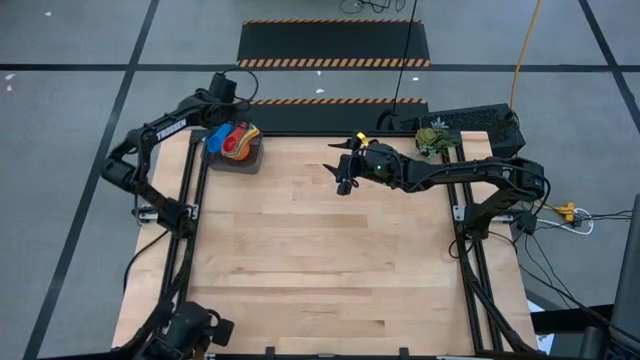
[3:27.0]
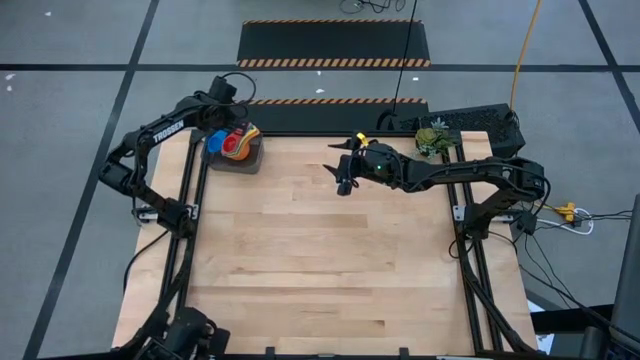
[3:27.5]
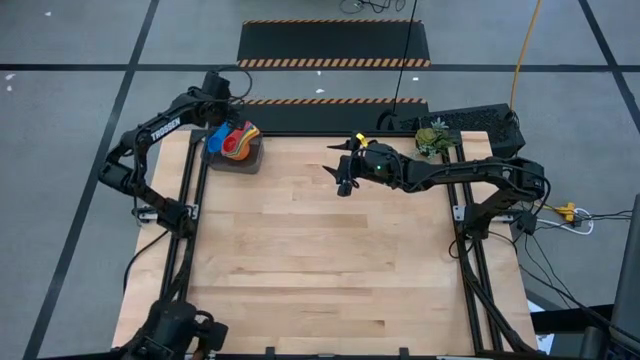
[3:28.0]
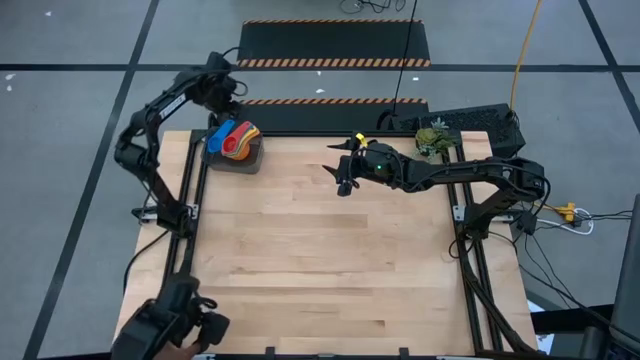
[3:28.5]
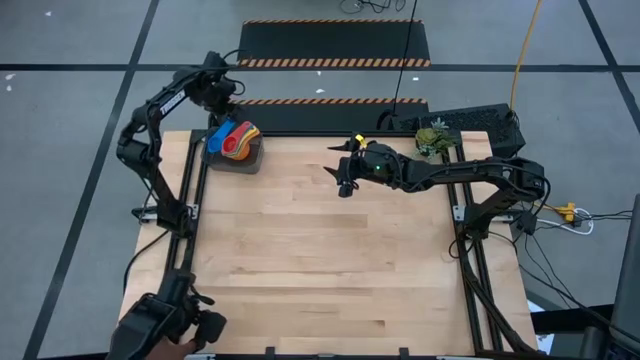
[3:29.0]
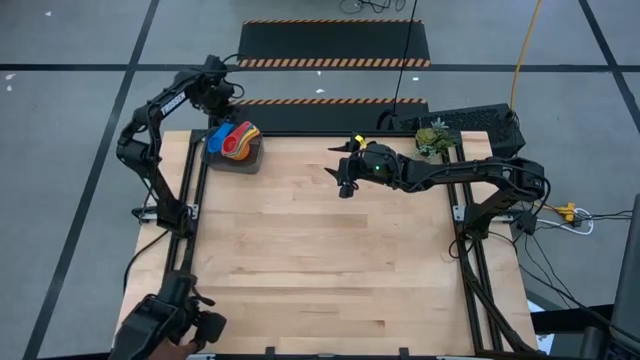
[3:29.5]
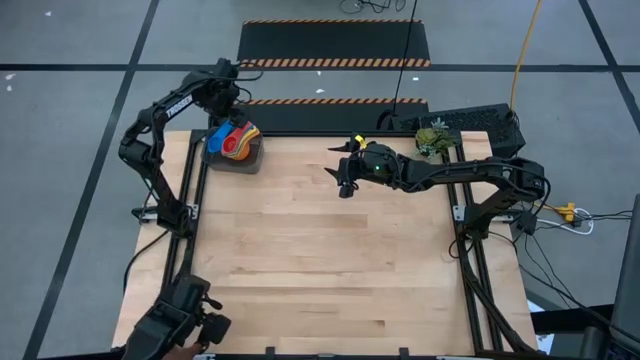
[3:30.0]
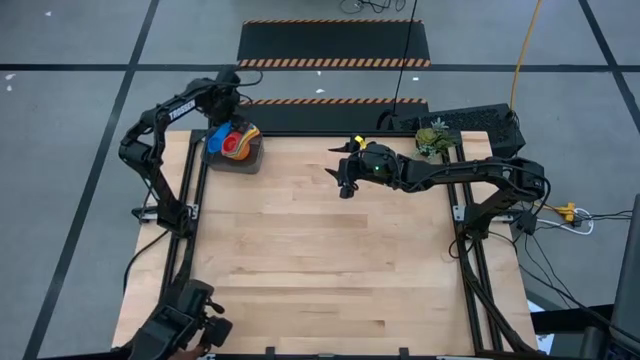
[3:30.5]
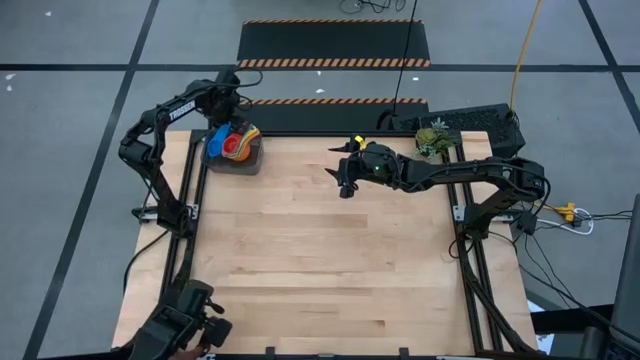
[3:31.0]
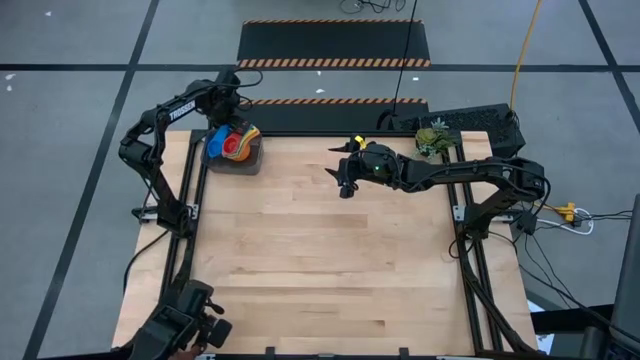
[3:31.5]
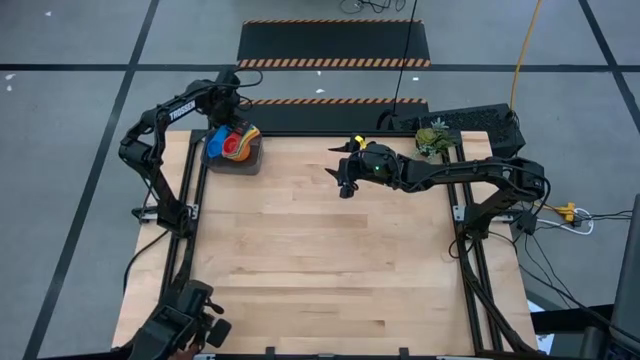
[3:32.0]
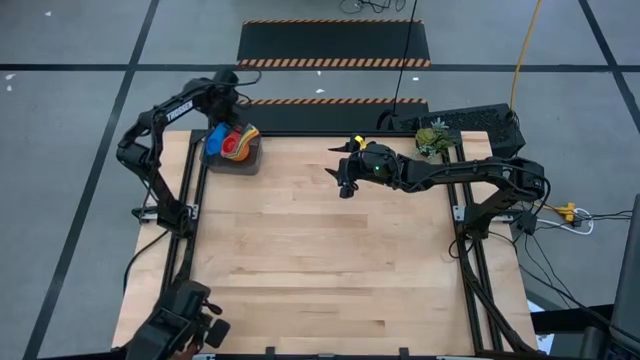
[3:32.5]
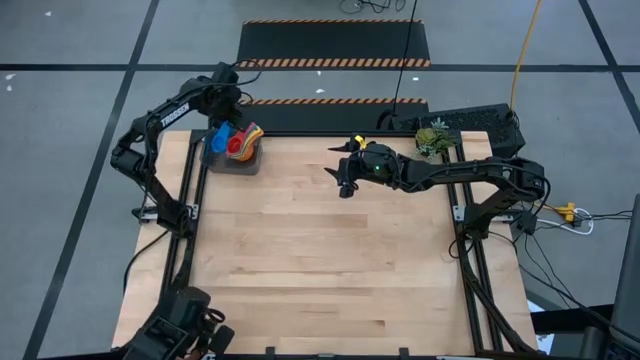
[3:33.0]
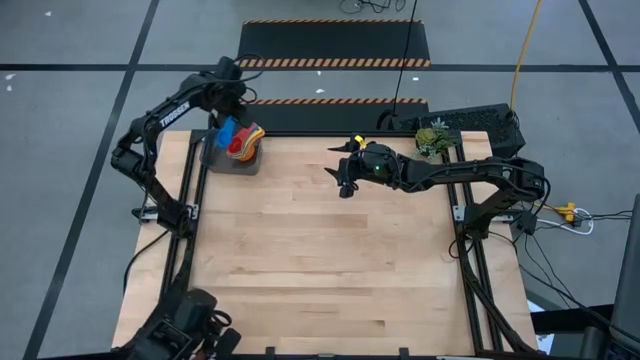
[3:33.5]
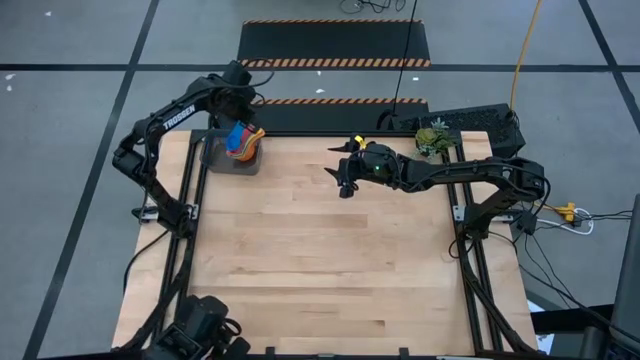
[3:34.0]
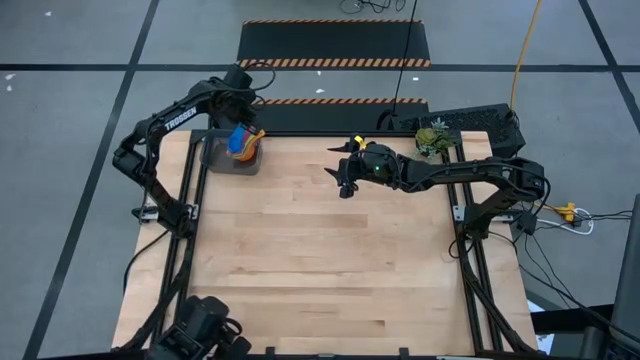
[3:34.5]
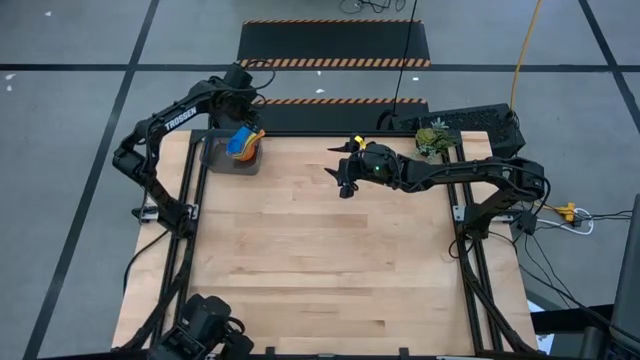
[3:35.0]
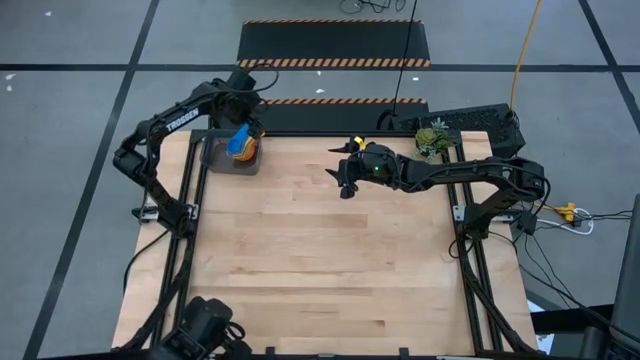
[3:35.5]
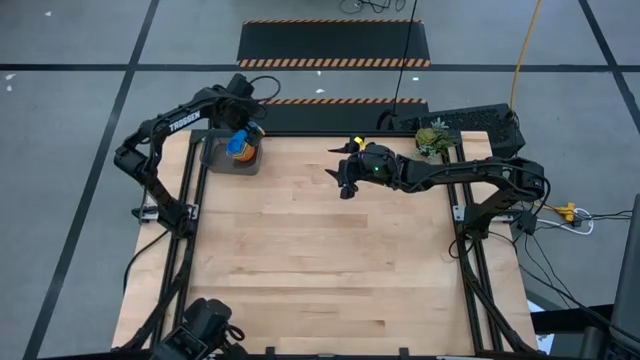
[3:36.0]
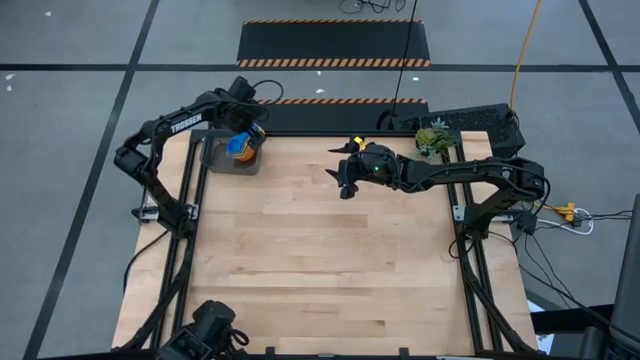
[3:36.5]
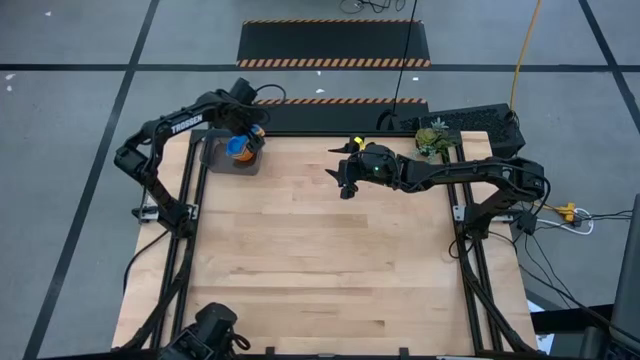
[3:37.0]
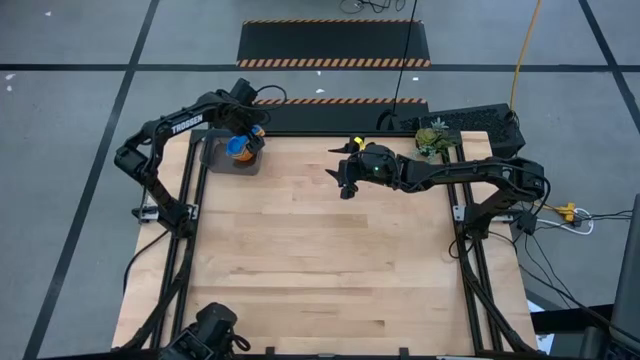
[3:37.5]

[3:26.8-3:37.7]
Task: Nest measuring cups in basket
Stack the blue measuring cup on top of the red measuring cup

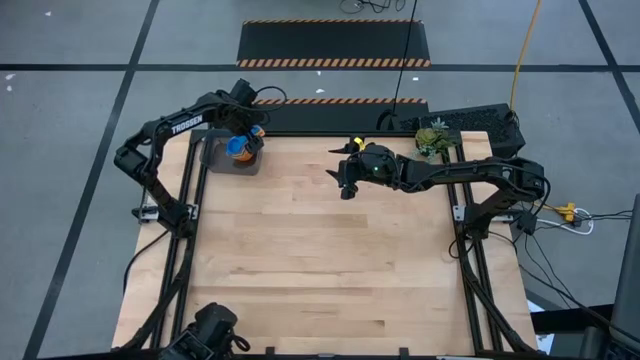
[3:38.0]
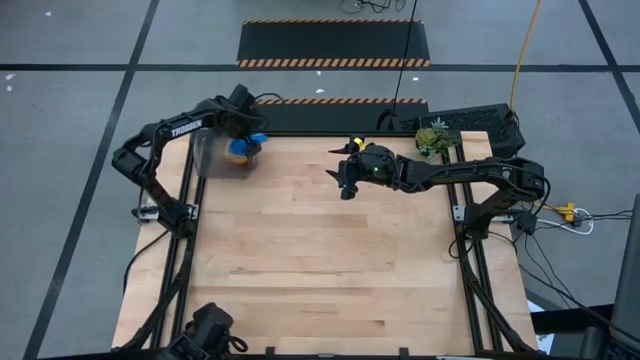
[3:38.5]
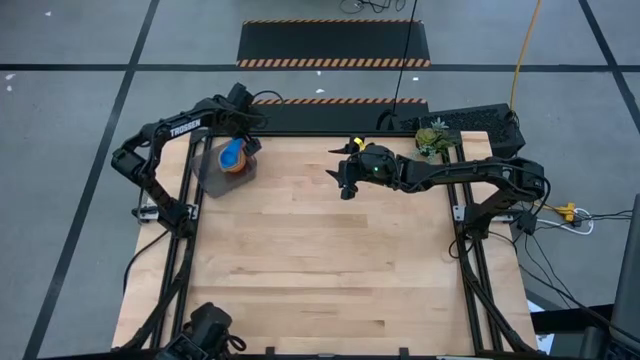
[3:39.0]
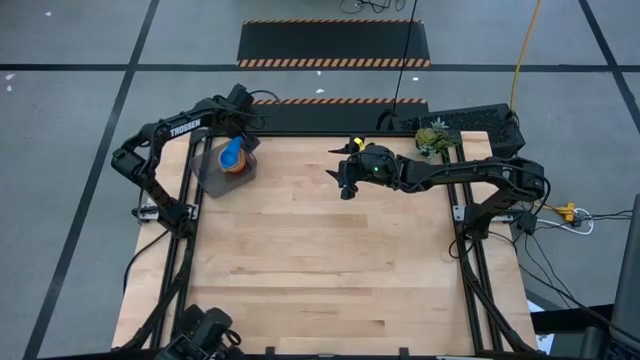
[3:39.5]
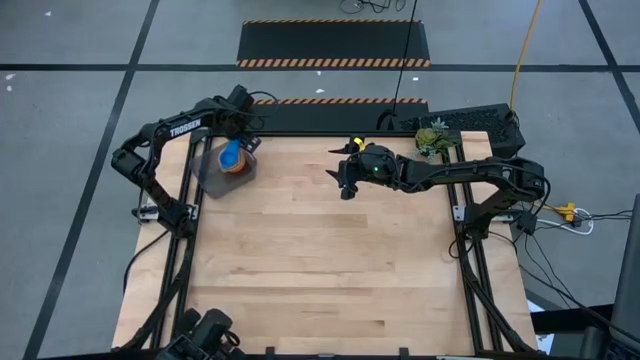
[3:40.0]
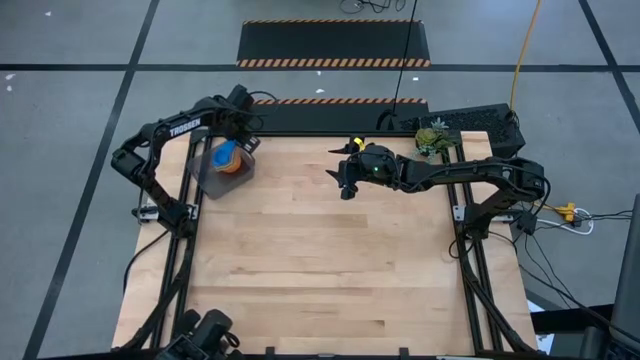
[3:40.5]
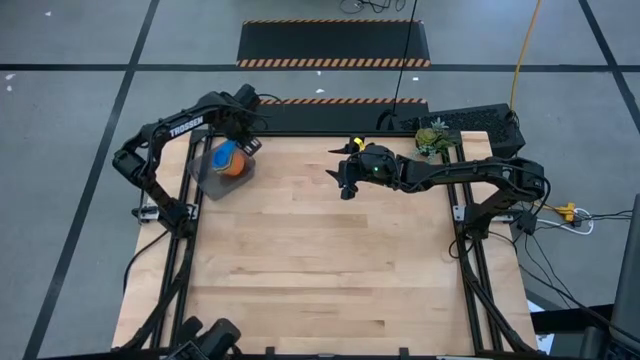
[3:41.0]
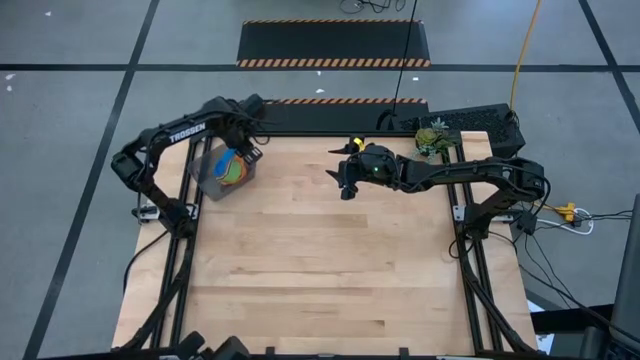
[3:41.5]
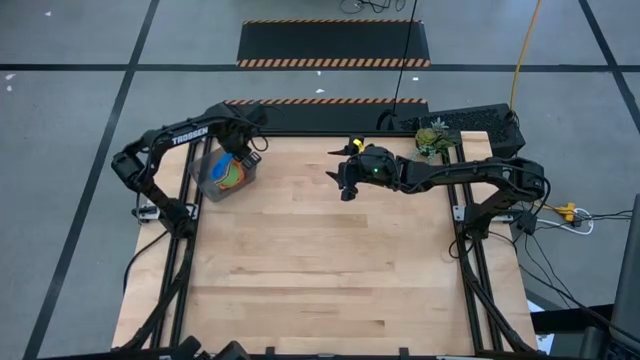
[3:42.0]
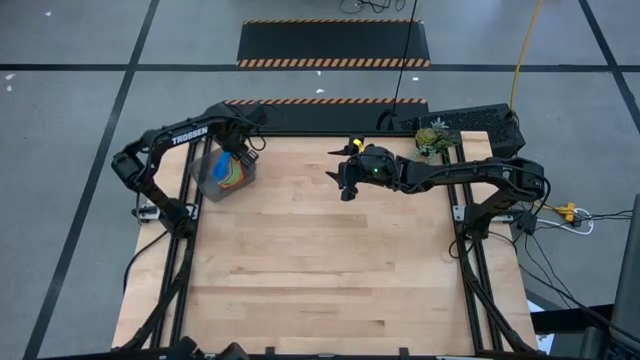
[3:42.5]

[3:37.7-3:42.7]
Adjust the stacked measuring cup into the black bin

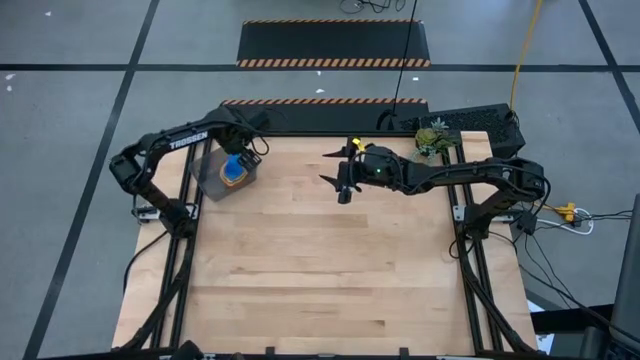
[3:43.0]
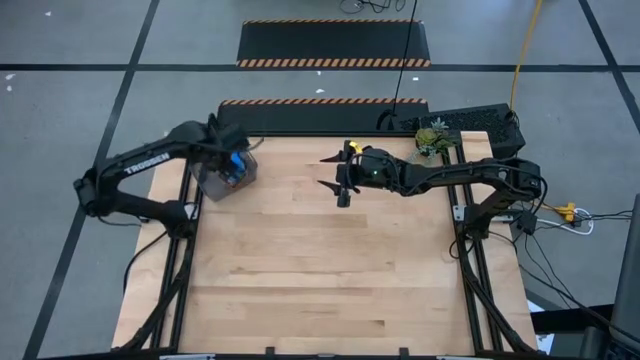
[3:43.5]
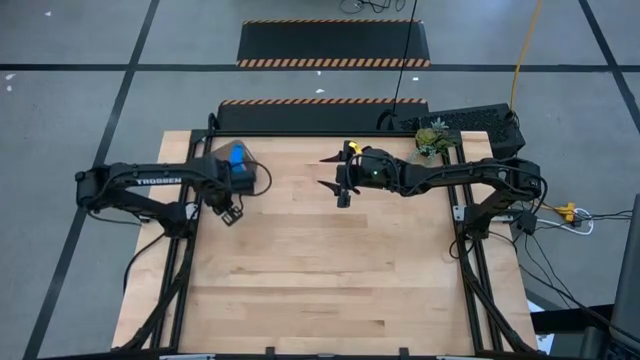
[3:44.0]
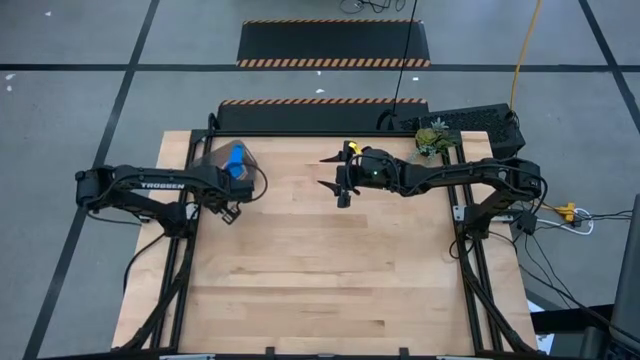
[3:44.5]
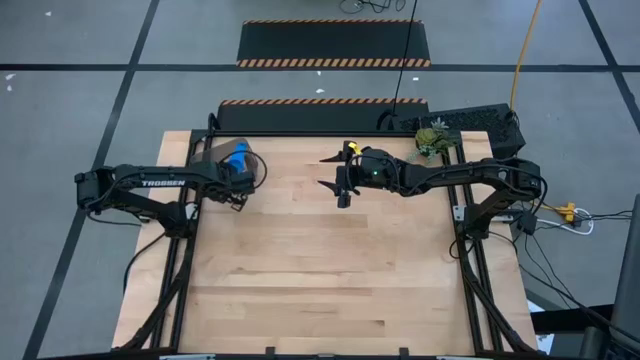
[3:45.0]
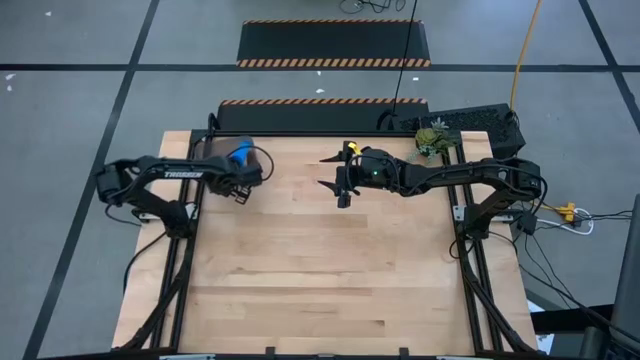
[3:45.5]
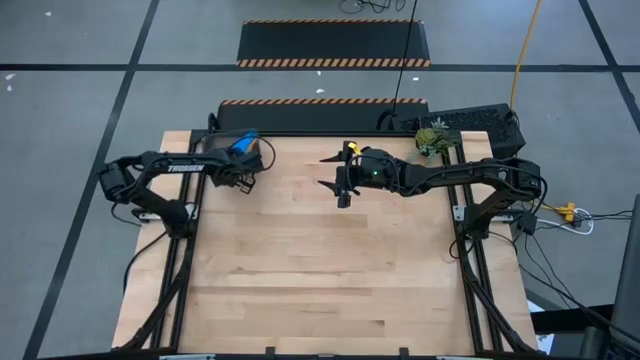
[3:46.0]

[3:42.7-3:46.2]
Adjust the black bin

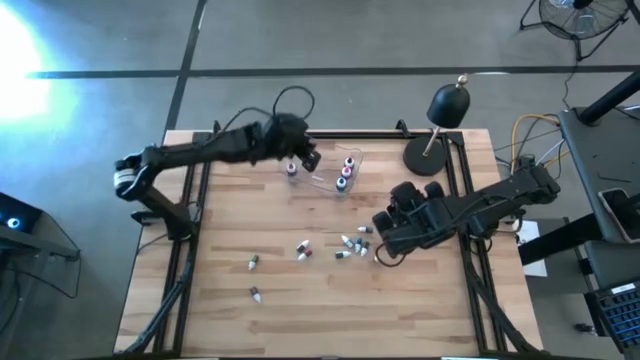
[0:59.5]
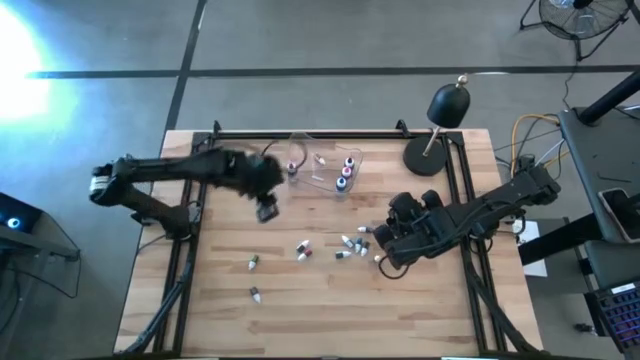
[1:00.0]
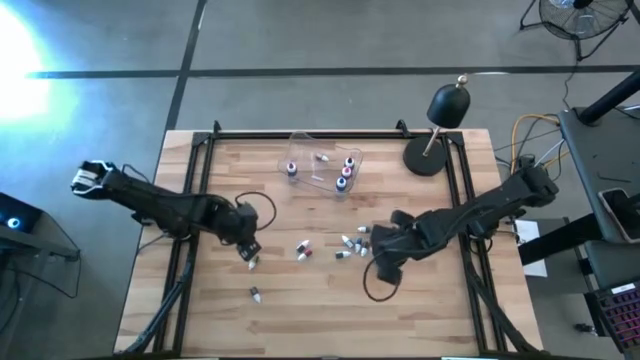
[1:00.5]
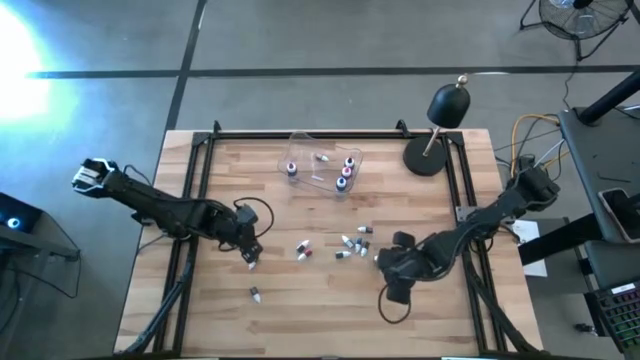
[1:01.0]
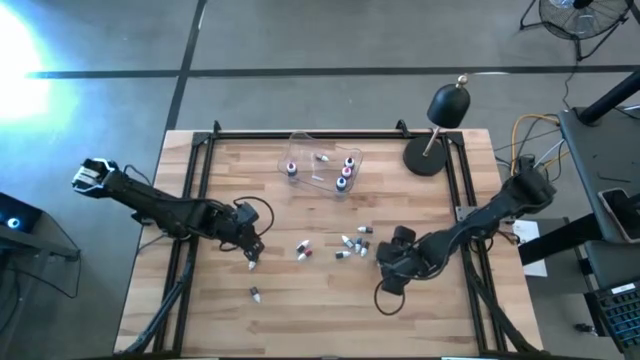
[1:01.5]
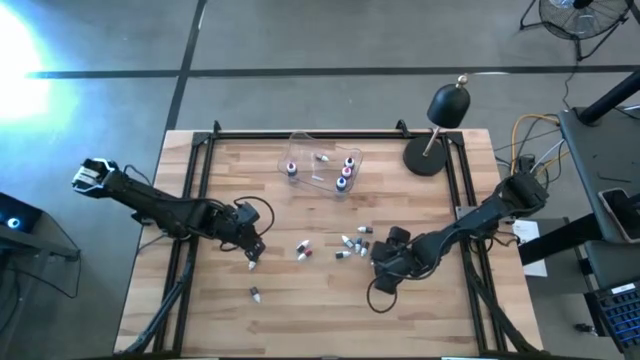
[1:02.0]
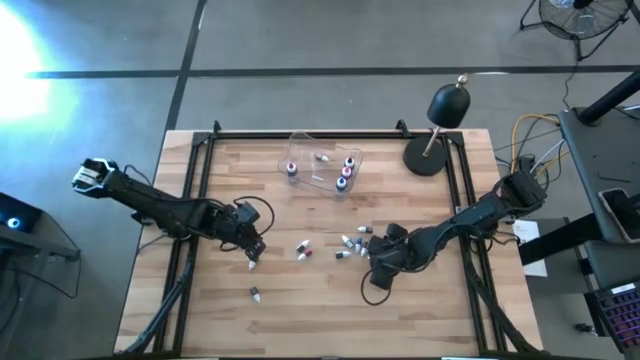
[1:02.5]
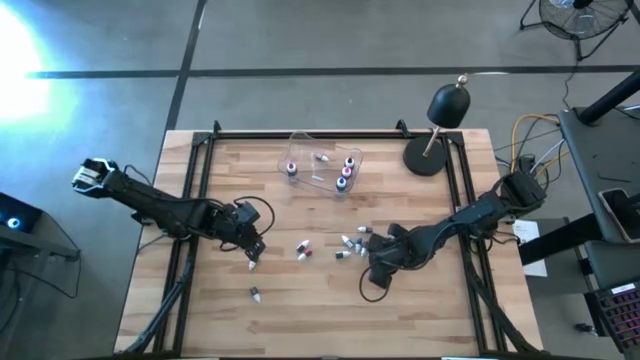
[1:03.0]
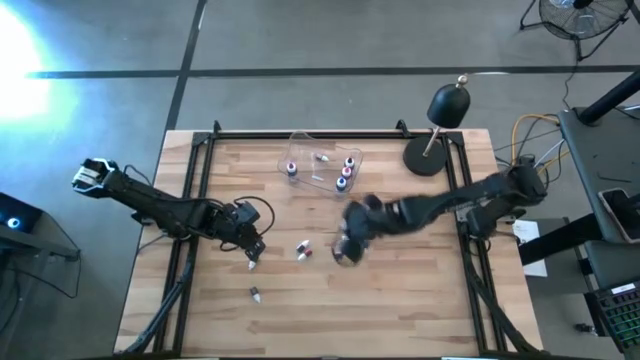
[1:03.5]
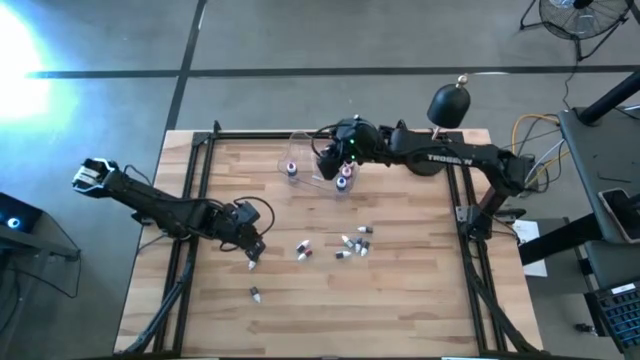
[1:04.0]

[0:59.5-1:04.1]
Task: Pick & Place food coloring
Put the bottom right small green food coloring bottle into the transparent bin
